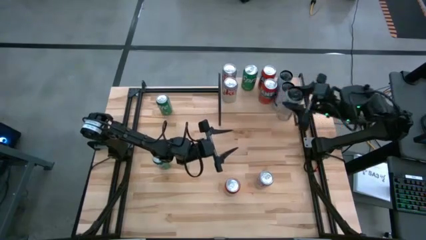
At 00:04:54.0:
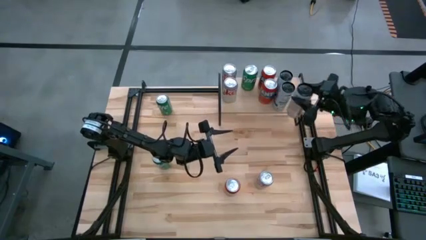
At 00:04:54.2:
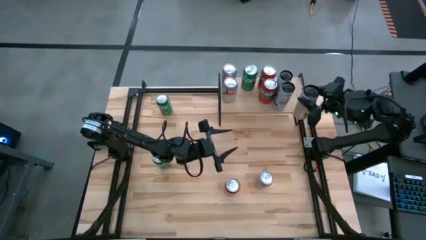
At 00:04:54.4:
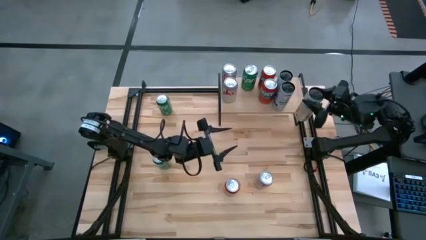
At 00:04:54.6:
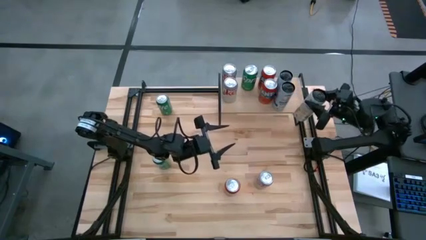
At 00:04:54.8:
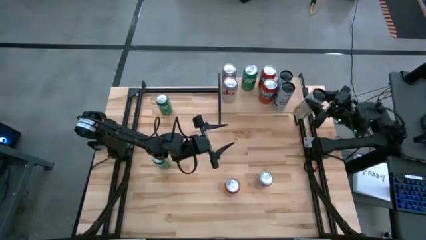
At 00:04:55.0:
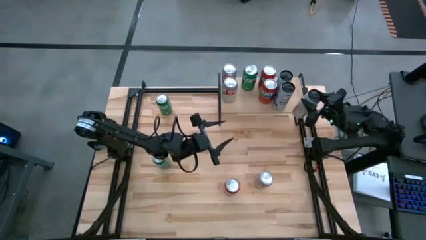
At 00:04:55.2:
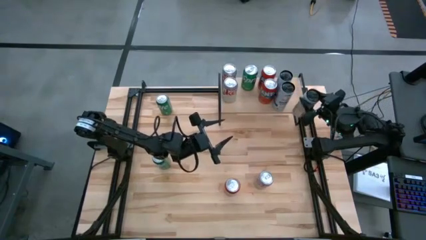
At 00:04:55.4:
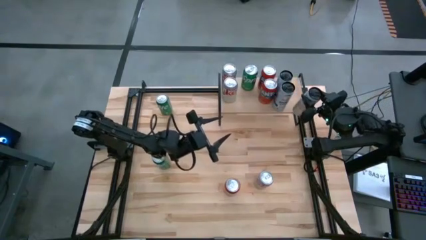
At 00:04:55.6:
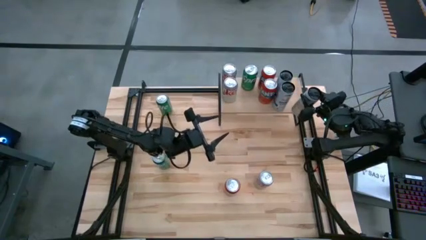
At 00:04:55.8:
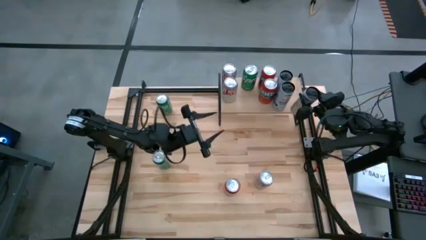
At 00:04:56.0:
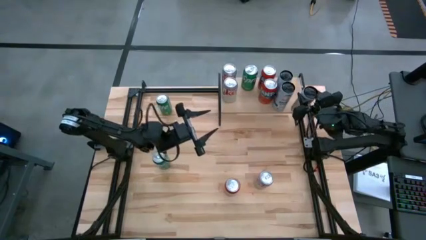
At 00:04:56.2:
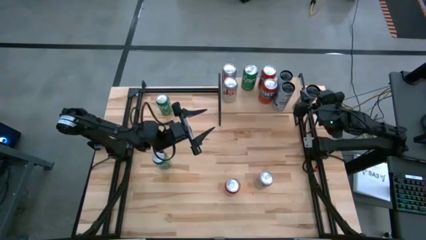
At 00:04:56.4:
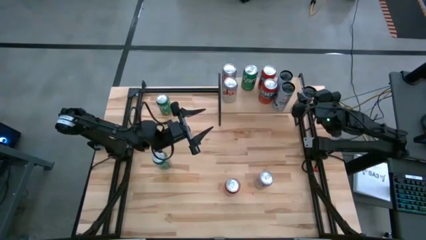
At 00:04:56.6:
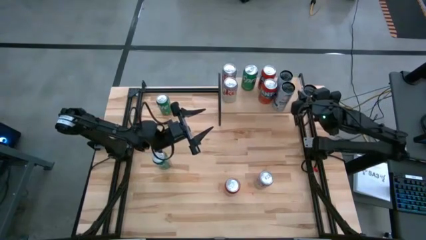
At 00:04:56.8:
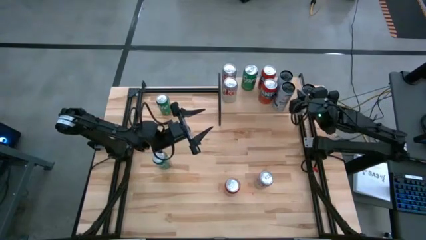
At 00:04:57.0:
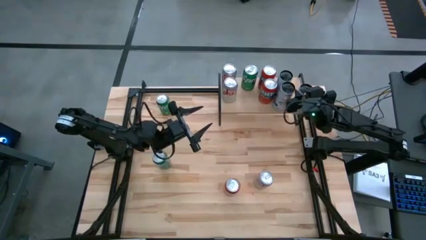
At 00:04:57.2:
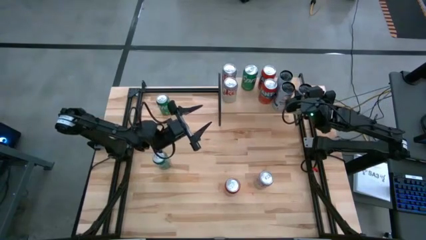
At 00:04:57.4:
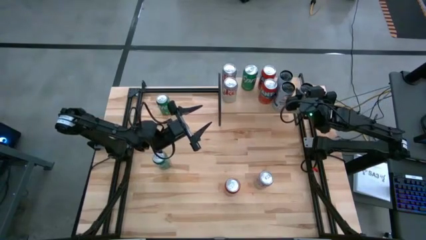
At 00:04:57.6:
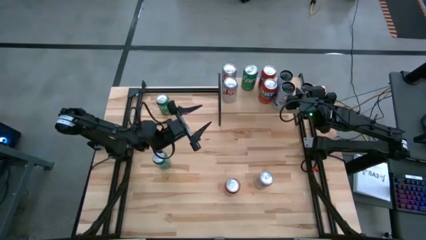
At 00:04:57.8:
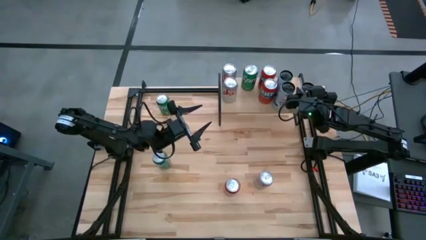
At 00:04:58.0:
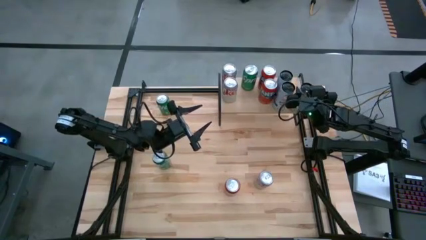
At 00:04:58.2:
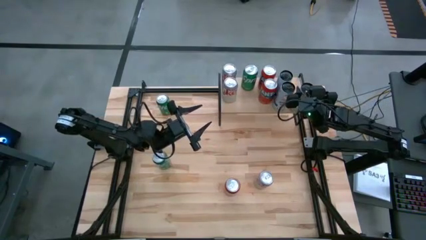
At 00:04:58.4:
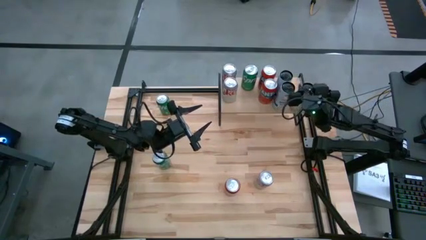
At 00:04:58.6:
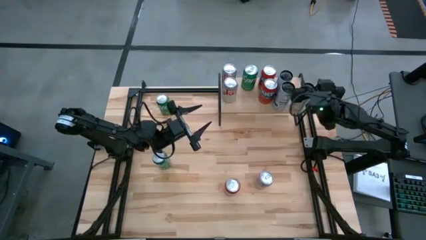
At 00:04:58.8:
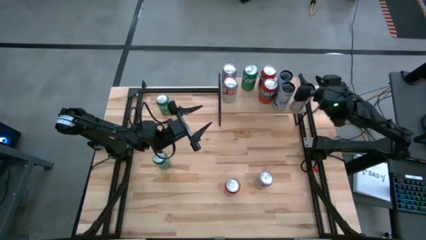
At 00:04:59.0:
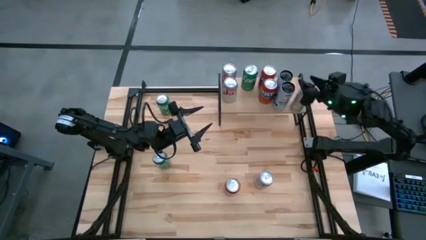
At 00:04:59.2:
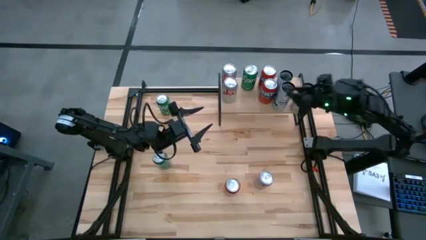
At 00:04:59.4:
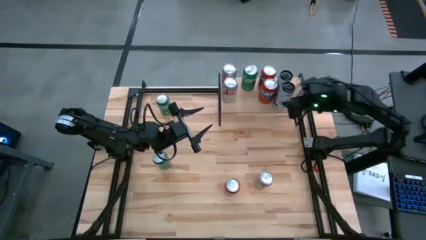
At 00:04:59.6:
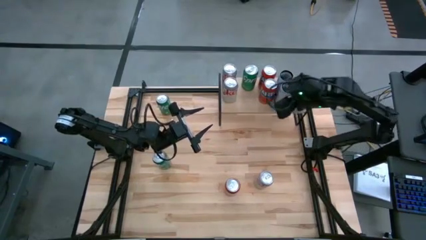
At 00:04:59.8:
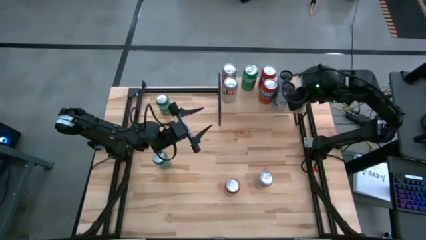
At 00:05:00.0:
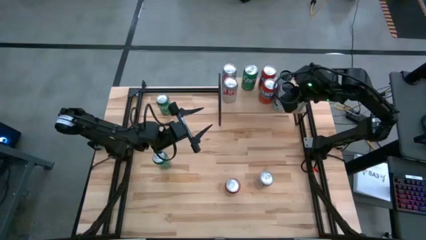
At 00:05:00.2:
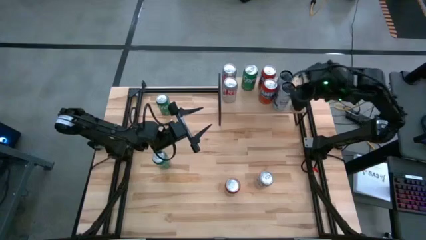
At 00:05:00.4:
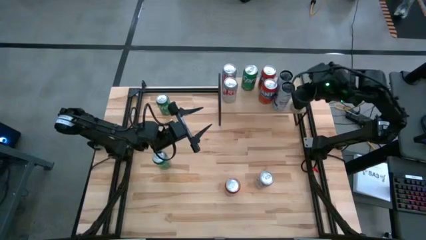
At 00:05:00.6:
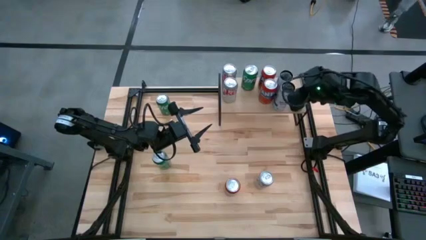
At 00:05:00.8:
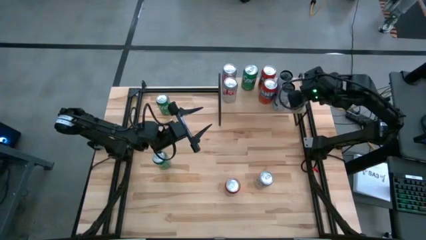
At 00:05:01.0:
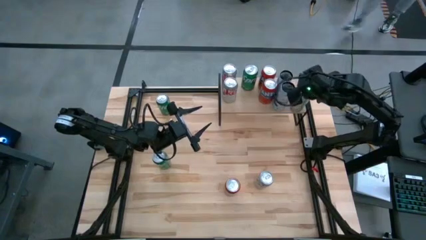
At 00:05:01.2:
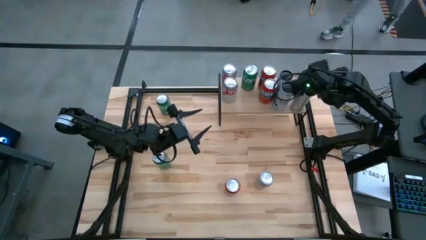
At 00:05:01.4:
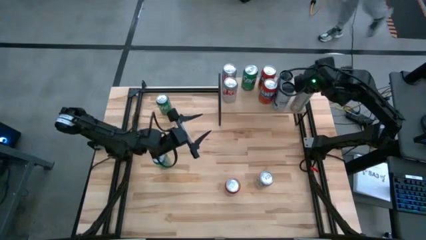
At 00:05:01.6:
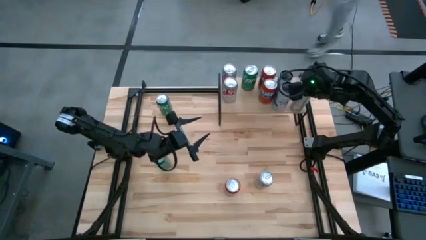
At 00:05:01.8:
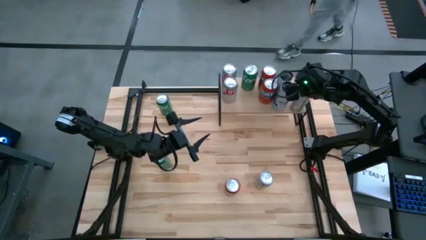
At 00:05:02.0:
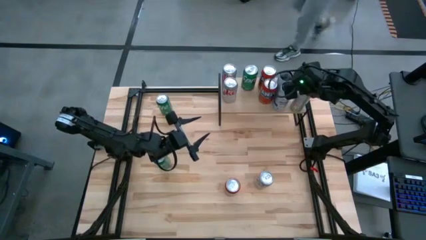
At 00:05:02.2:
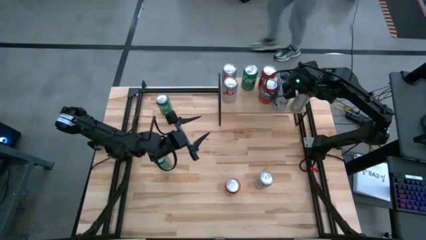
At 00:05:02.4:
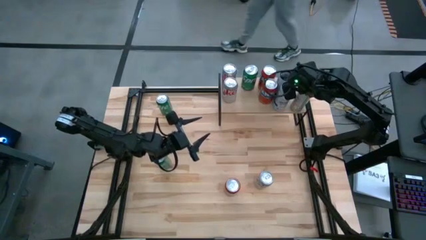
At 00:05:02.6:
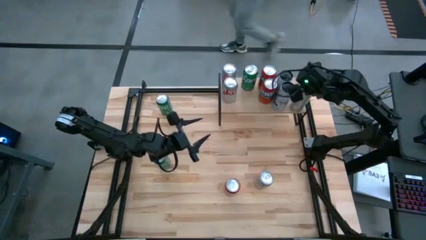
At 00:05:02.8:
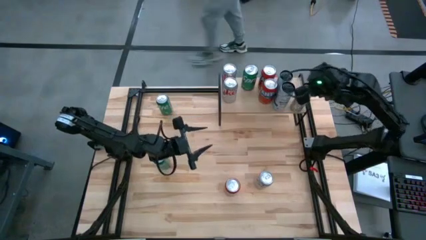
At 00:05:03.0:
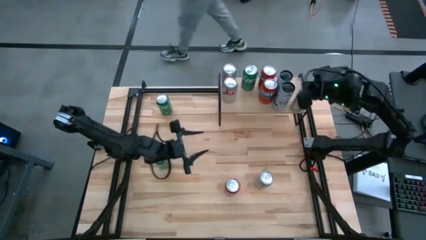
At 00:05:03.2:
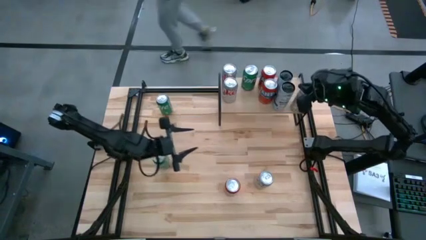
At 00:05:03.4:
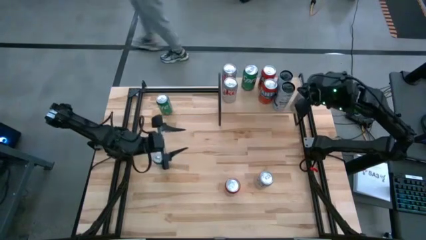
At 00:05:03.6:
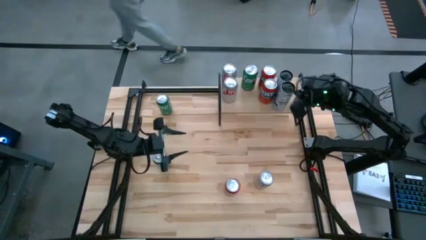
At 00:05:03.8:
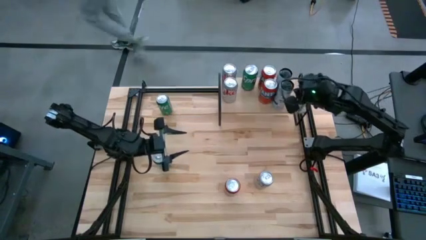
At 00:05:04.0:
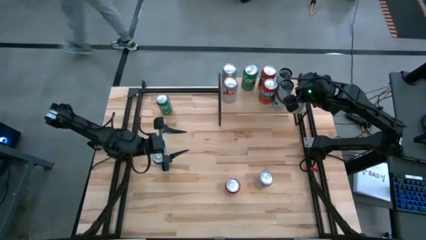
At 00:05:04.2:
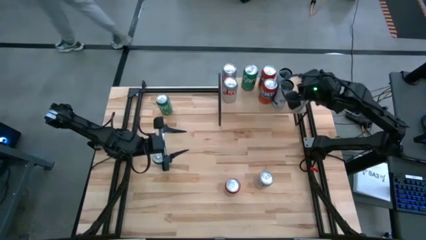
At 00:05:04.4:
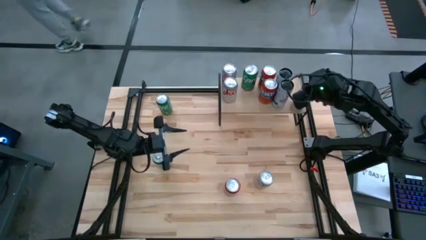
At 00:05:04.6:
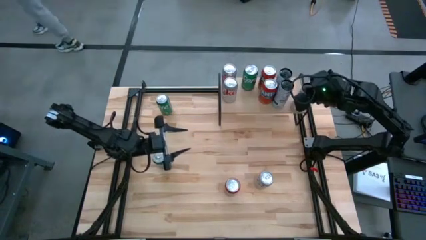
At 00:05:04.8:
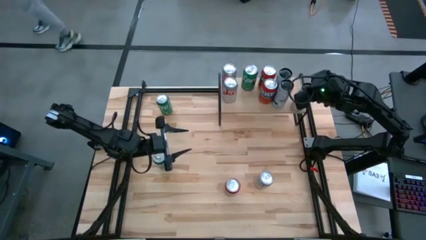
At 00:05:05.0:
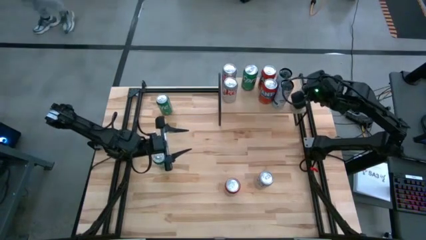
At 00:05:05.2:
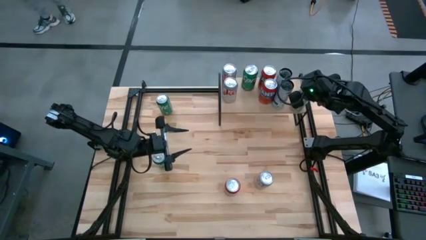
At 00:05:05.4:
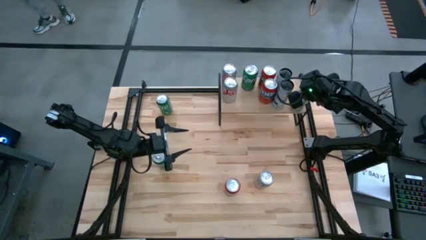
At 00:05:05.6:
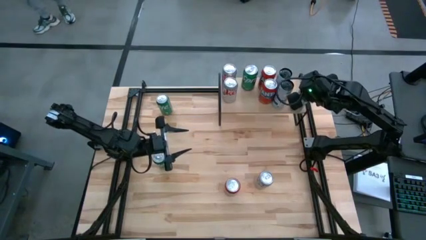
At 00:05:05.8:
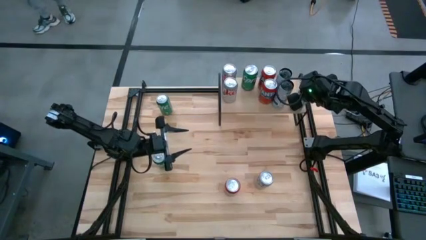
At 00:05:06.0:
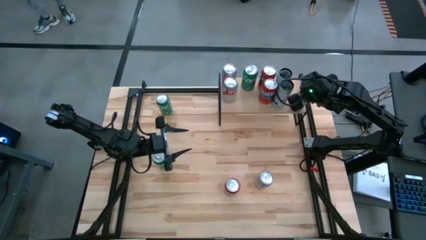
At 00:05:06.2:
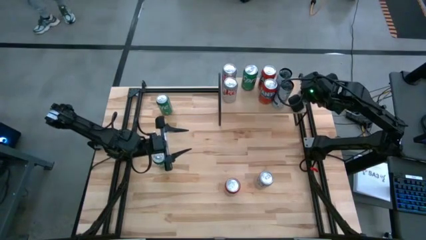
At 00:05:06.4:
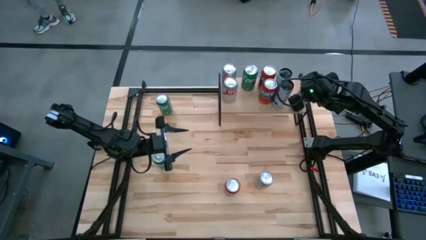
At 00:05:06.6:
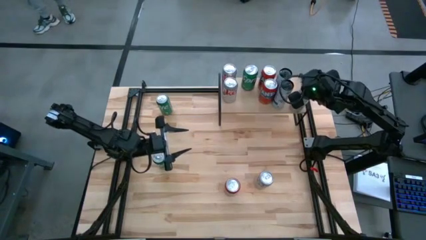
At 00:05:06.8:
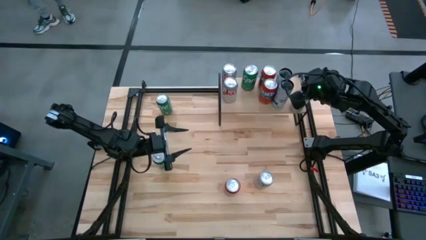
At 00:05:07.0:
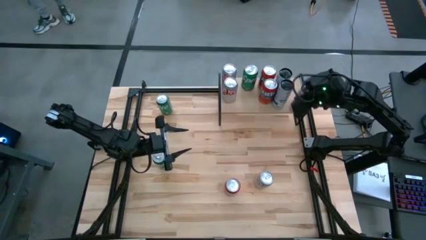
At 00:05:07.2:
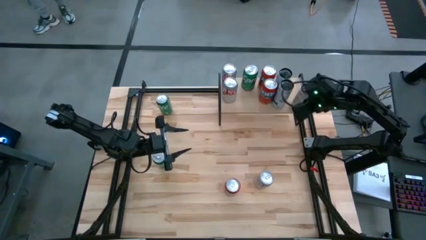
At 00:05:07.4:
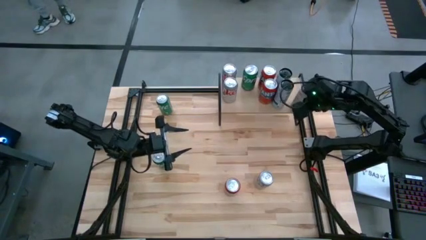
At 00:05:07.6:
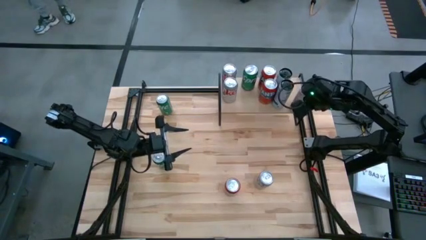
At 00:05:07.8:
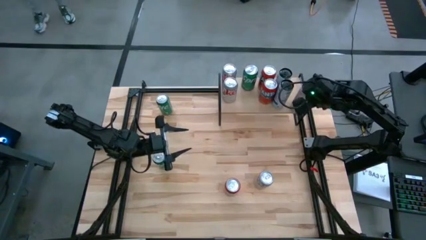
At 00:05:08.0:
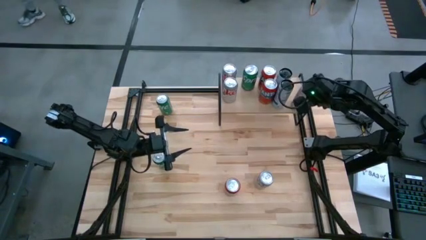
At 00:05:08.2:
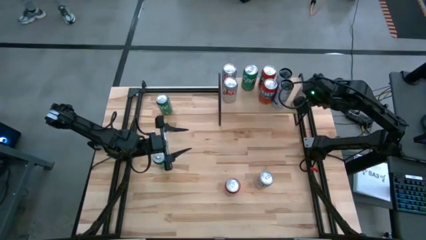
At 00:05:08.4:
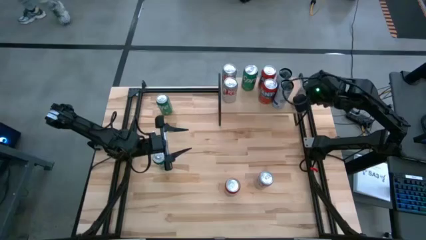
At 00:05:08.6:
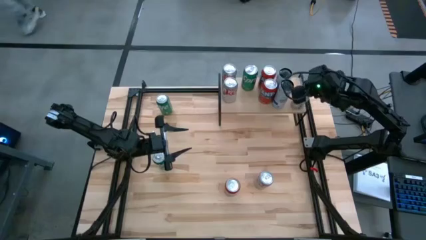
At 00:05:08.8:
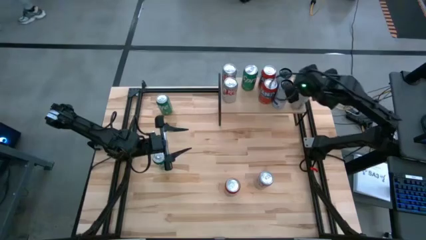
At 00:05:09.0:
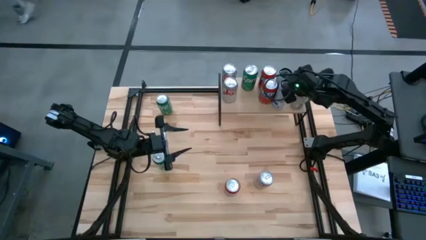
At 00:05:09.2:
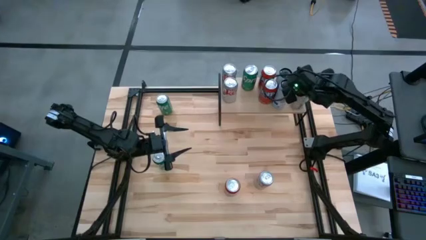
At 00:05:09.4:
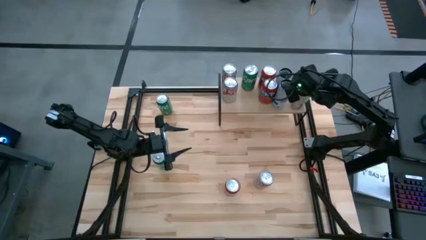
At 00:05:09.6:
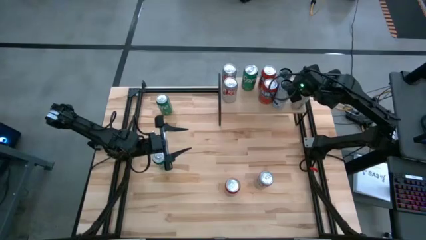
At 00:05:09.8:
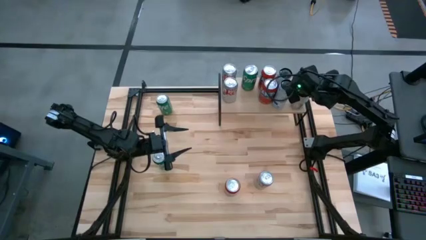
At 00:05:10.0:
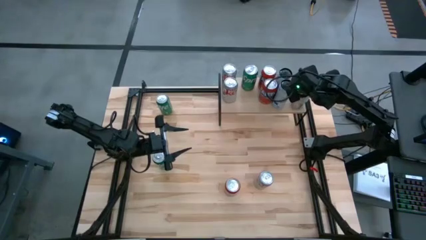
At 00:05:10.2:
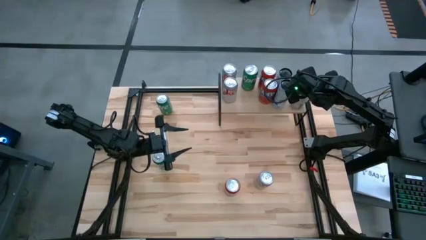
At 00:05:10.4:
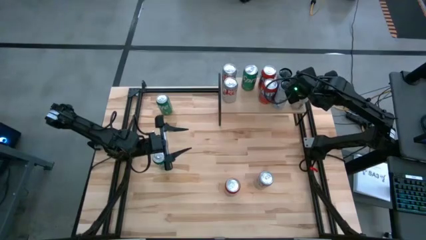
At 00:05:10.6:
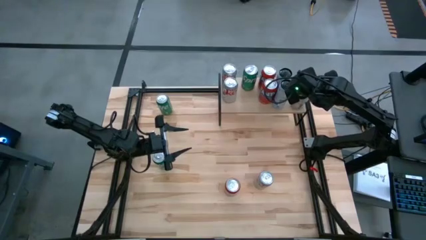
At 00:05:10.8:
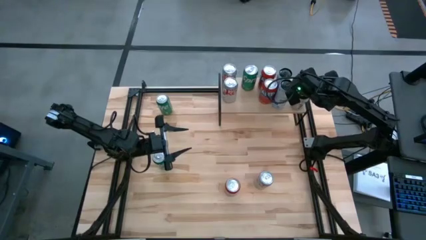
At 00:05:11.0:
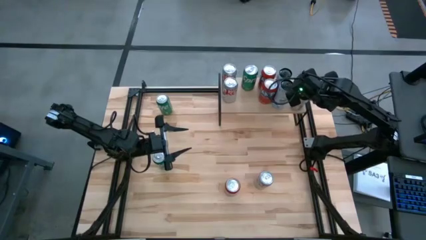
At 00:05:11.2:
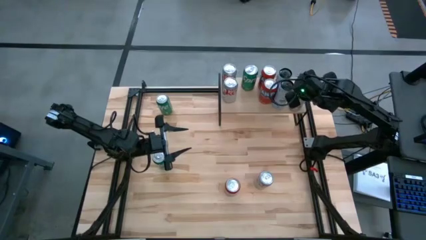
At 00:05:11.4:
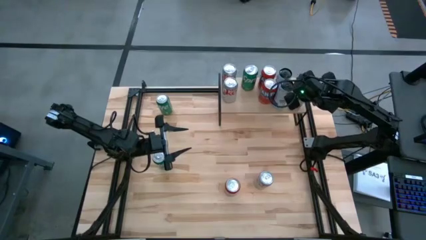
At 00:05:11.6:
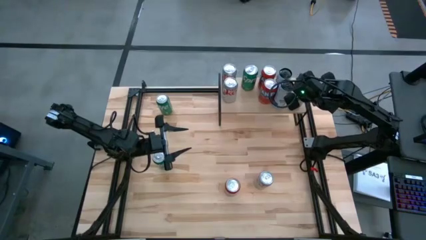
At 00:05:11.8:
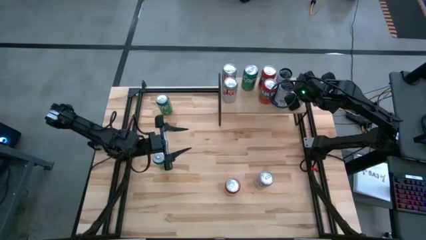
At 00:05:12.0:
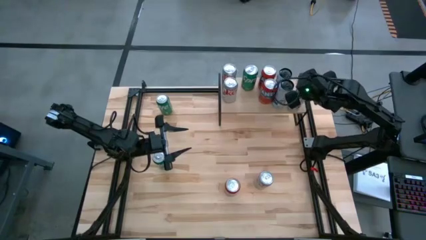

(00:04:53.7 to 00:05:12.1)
Task: Place canned beverage on shelf
Put the white soda can on the shelf aligned to the right of the other silver soda cans
